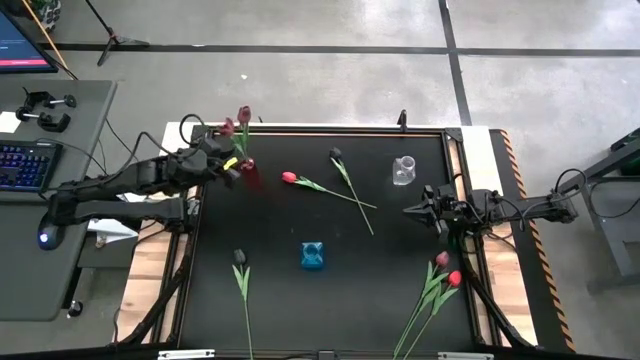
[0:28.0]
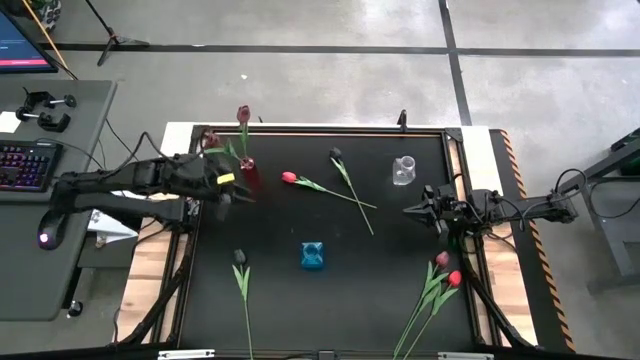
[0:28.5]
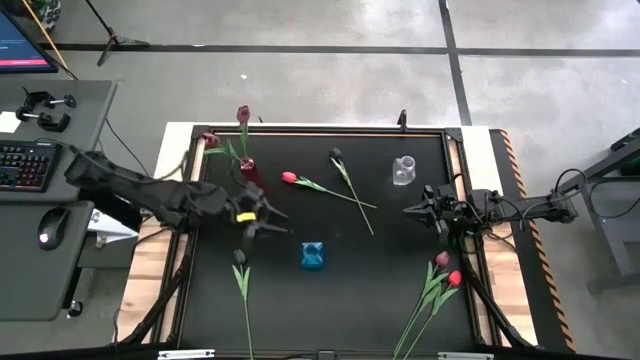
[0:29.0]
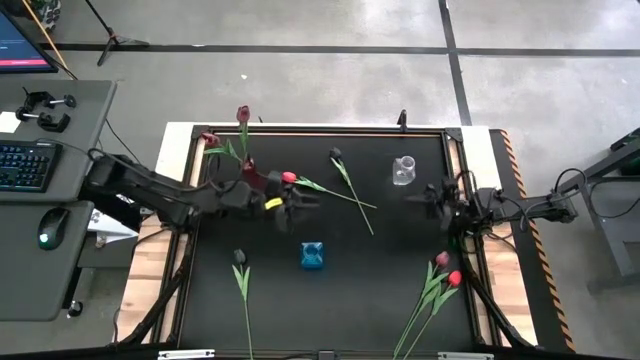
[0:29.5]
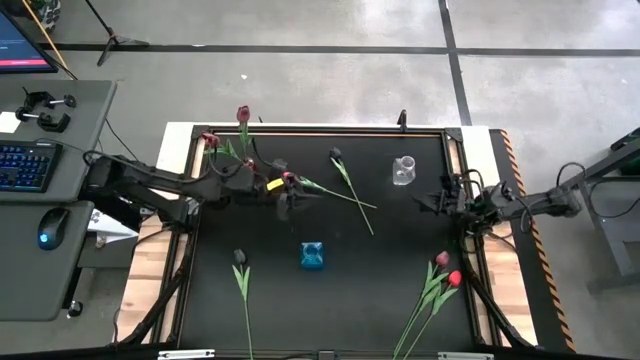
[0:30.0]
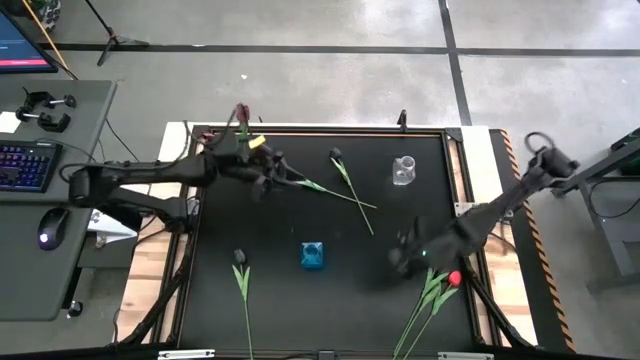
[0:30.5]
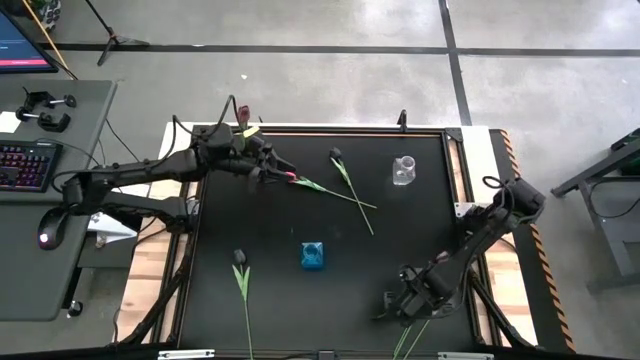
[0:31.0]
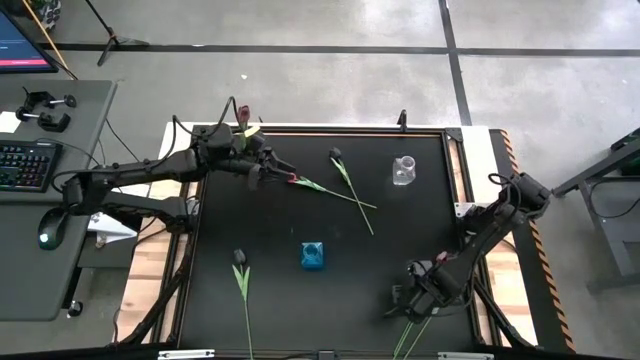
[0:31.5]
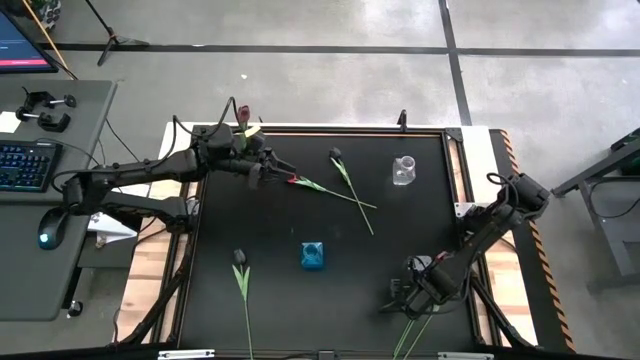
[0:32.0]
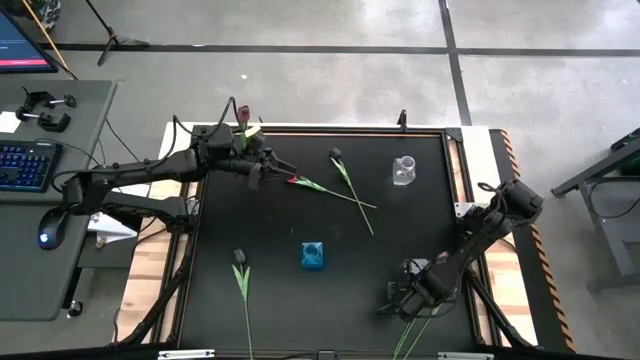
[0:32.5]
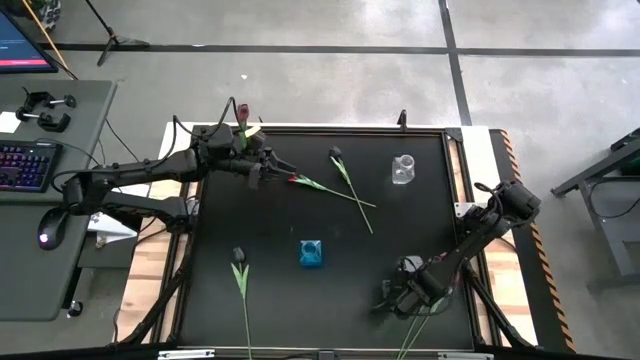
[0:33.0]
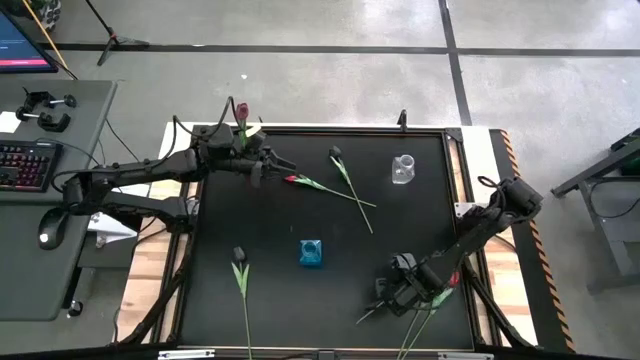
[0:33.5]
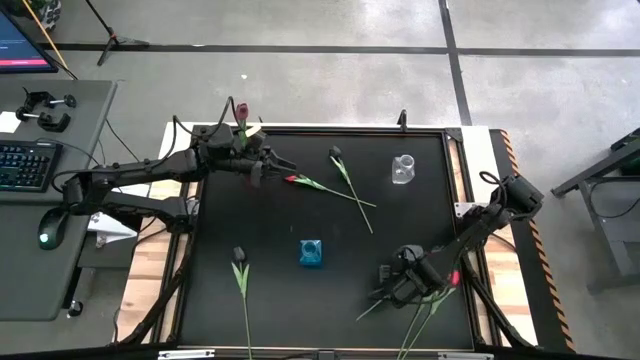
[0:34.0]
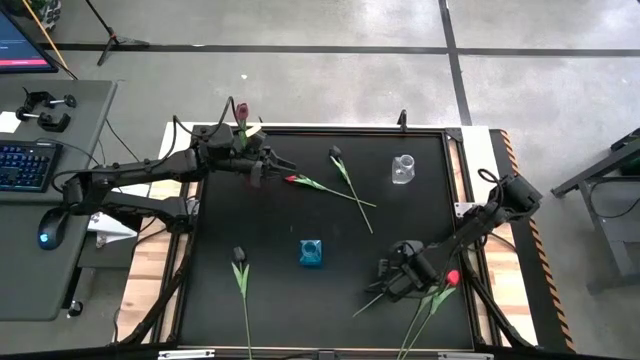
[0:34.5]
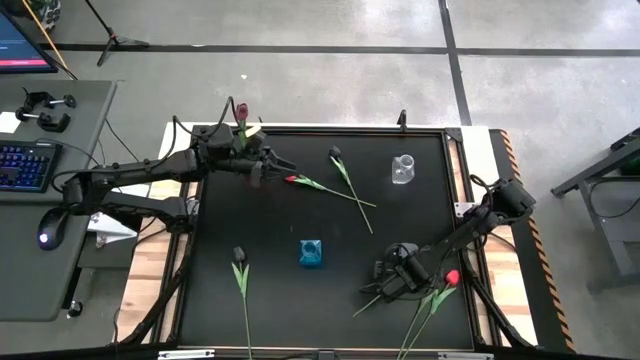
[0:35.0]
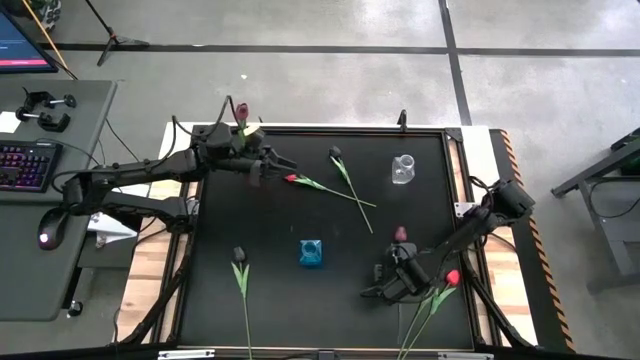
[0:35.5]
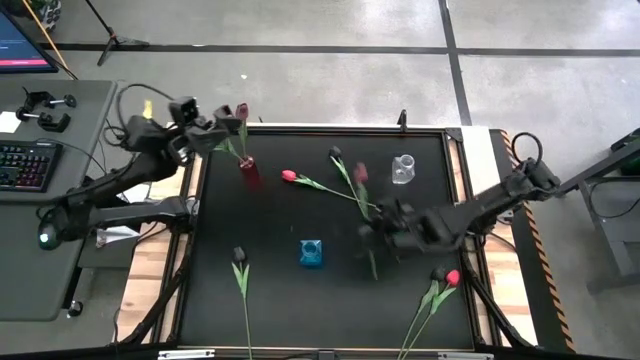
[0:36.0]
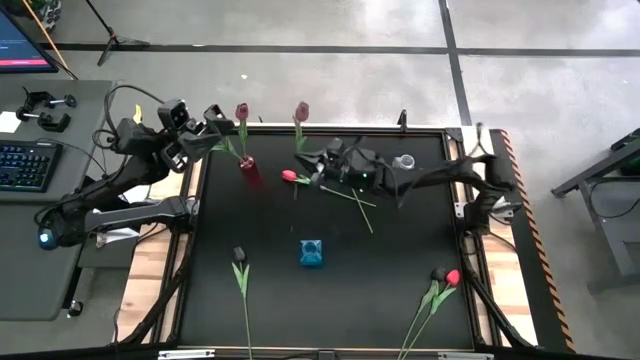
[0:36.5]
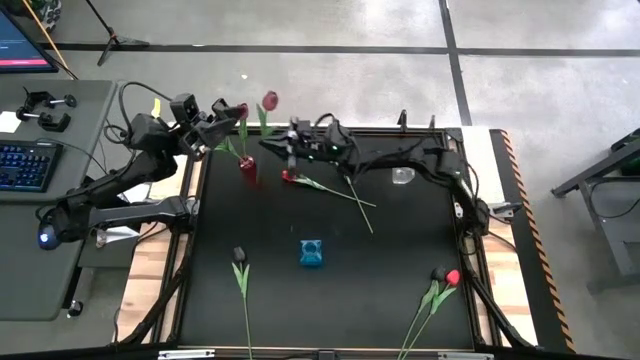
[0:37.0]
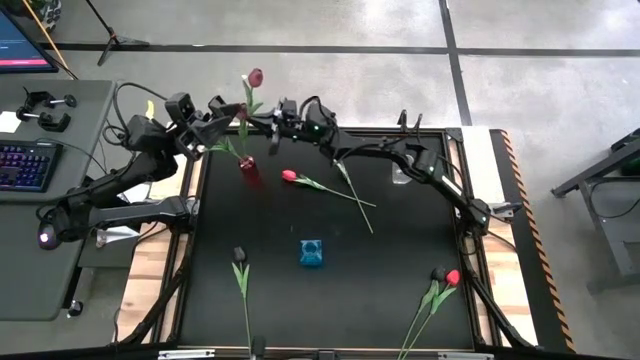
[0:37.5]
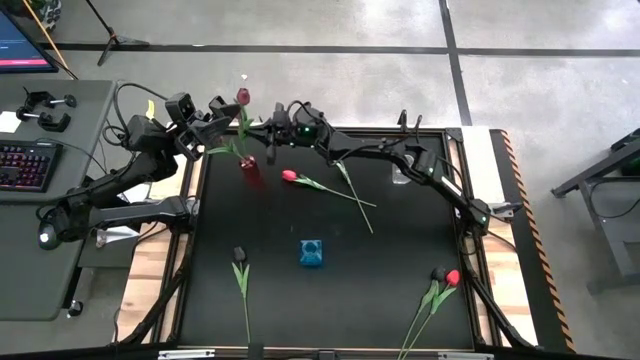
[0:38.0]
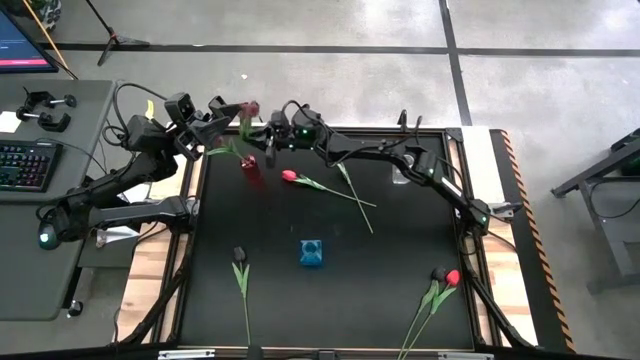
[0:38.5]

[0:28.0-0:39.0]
Task: Sort flowers into vase by color
Put the dark red flower into the red vase

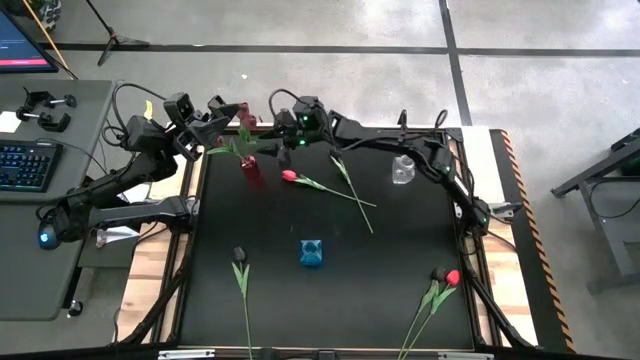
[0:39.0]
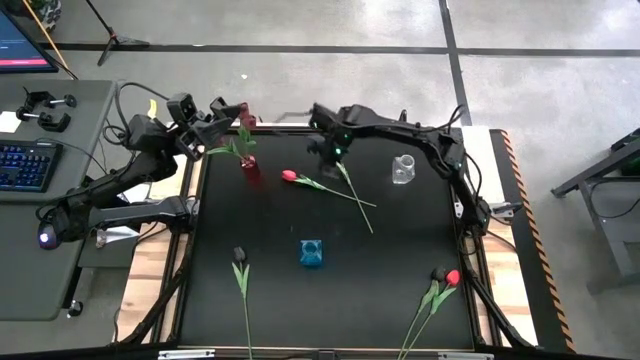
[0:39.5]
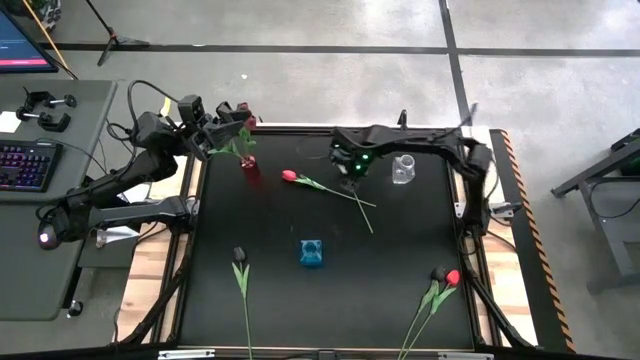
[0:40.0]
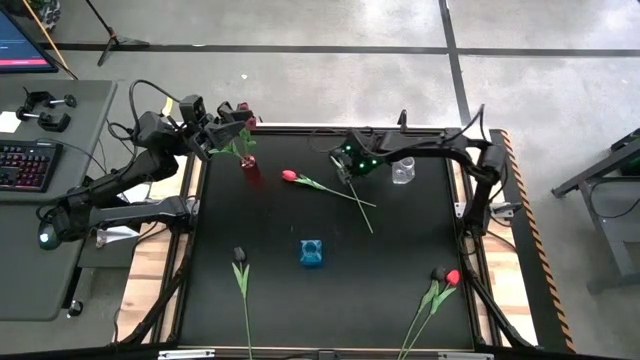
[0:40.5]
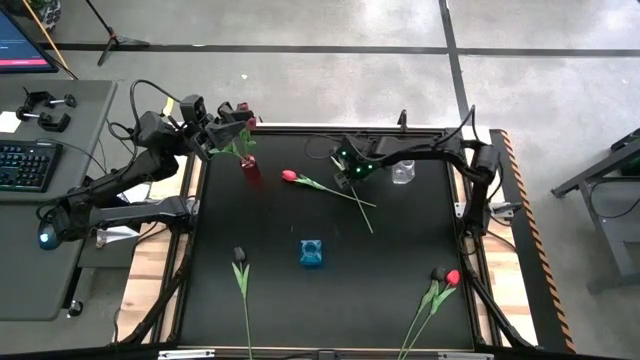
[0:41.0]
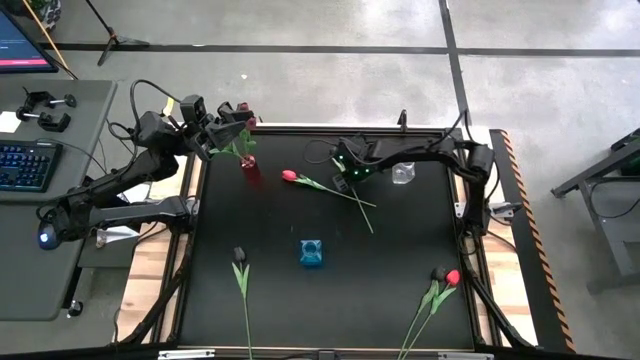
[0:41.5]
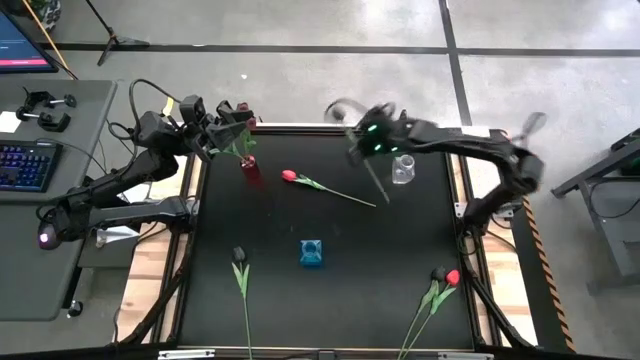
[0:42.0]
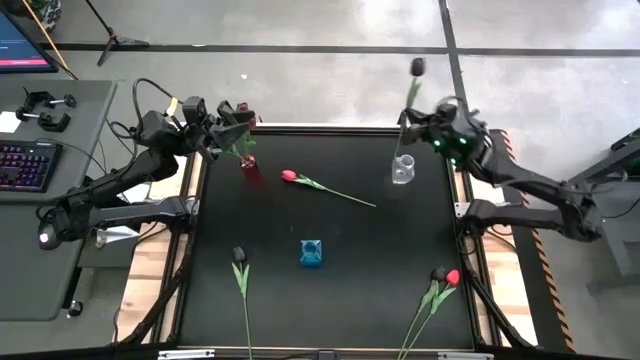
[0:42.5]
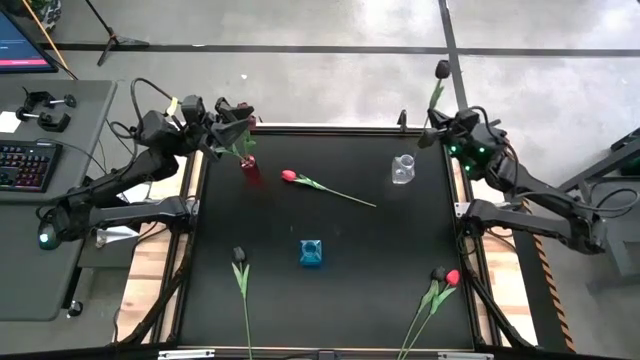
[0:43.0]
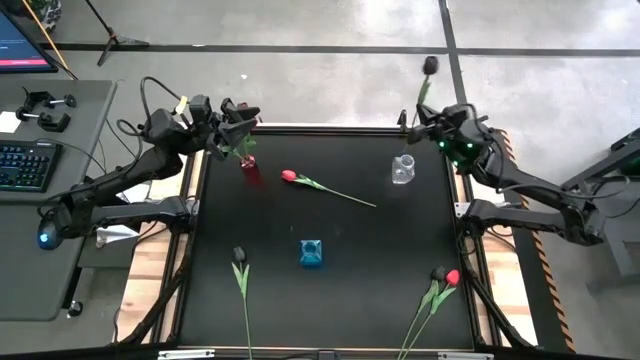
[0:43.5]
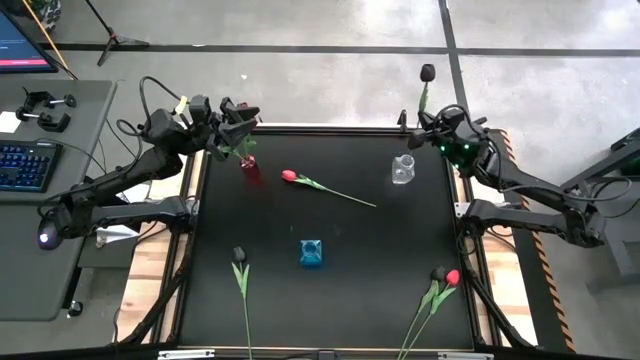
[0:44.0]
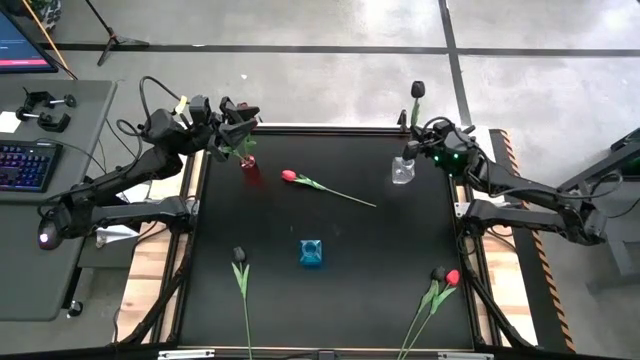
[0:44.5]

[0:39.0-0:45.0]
Put the top black flower into the transparent vase

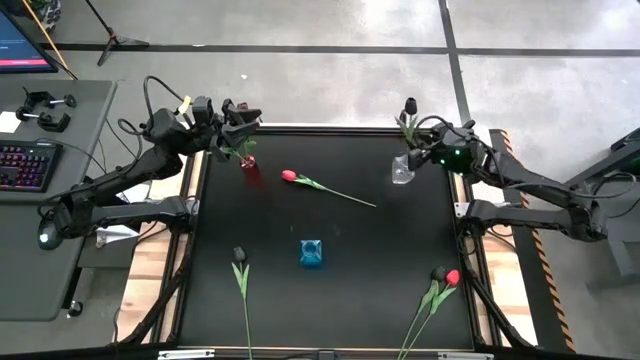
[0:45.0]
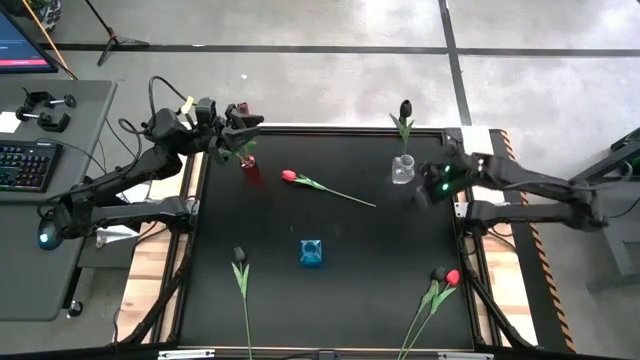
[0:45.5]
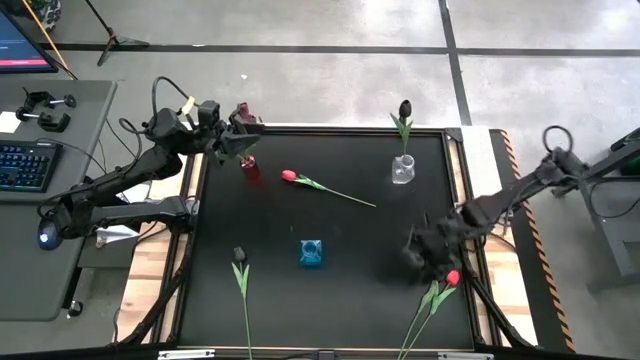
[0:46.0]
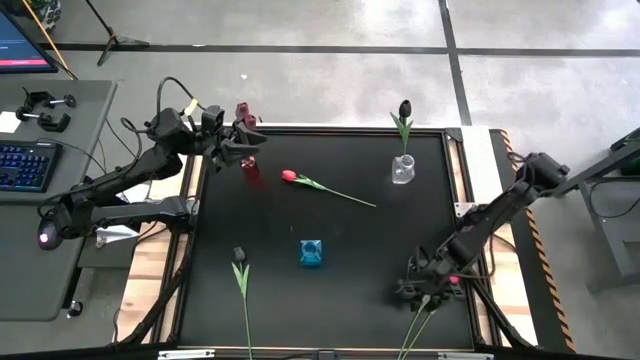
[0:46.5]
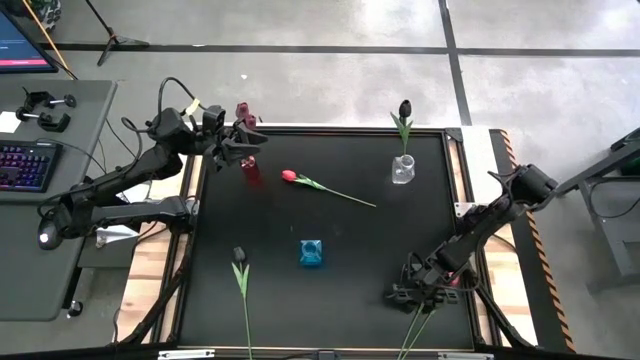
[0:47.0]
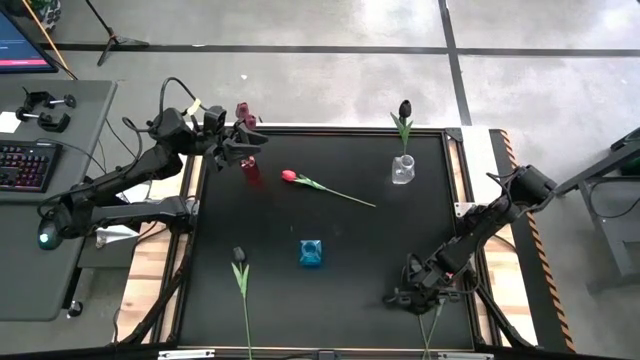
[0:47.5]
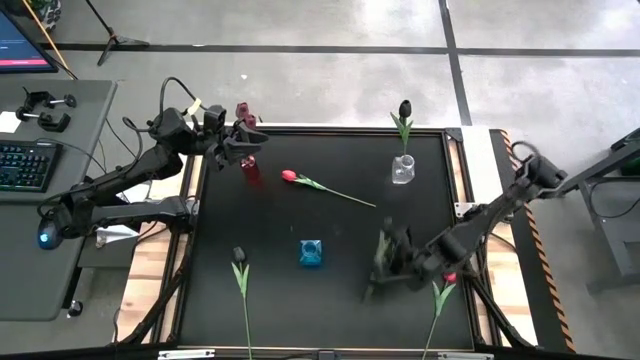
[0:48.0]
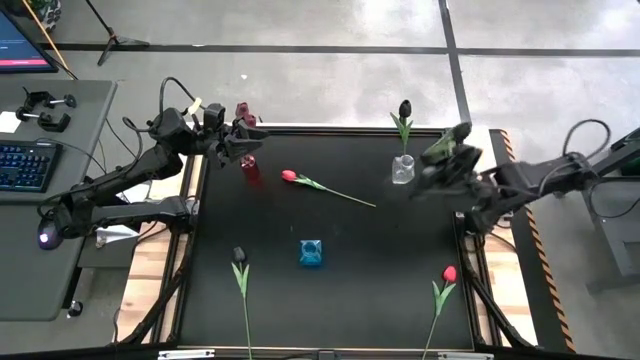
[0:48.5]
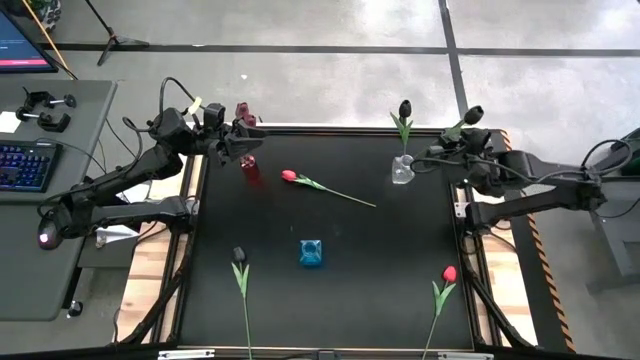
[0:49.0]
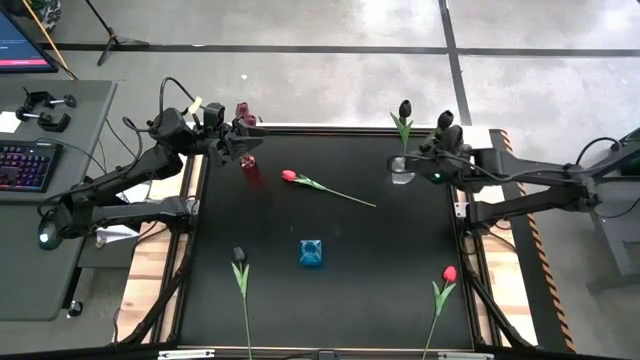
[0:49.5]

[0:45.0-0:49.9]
Put the right black flower into the transparent vase
